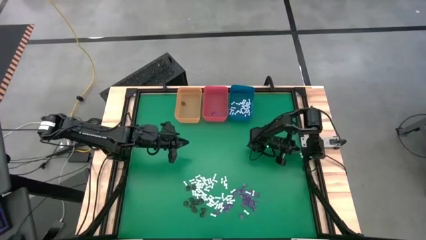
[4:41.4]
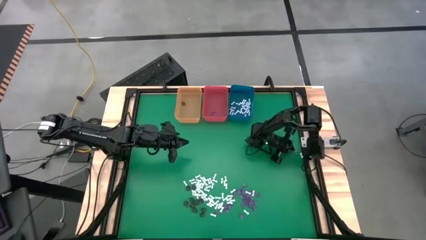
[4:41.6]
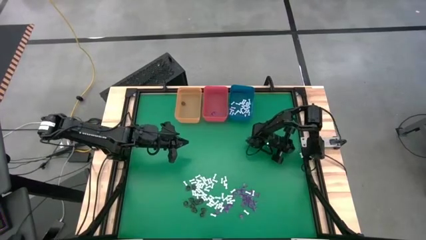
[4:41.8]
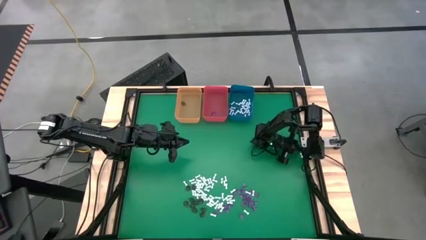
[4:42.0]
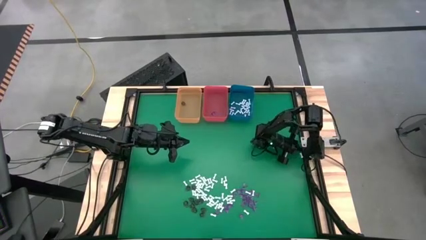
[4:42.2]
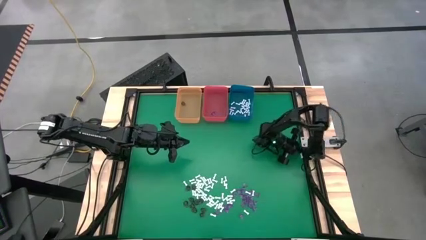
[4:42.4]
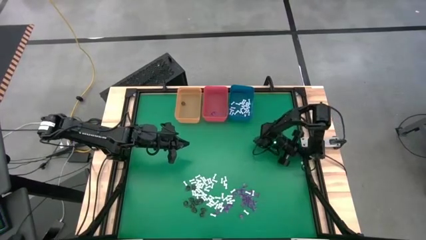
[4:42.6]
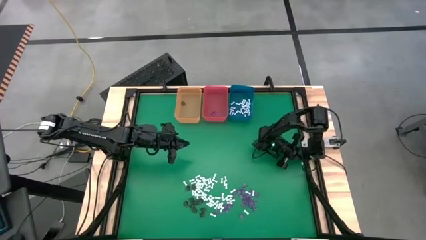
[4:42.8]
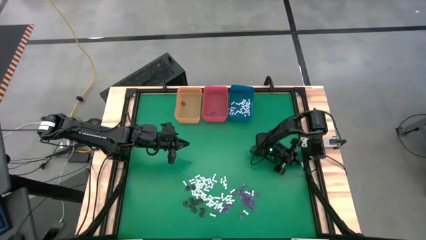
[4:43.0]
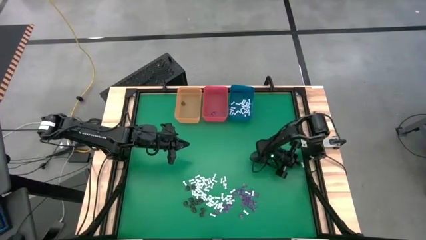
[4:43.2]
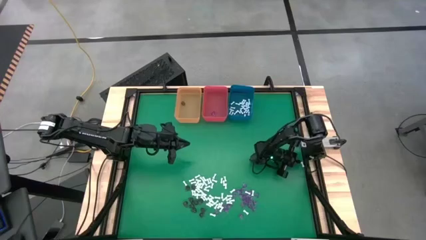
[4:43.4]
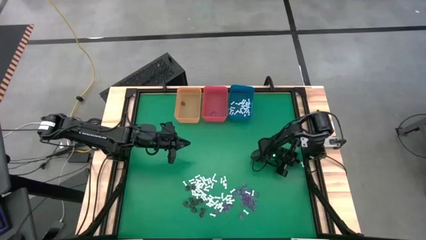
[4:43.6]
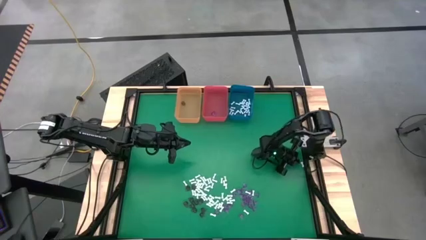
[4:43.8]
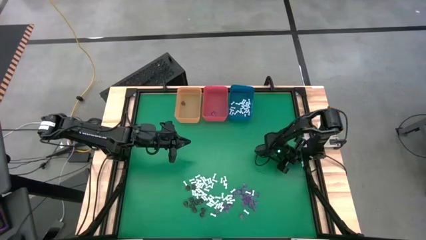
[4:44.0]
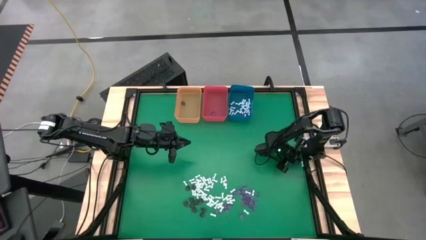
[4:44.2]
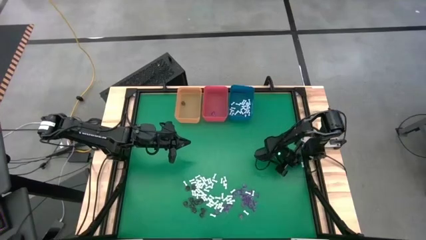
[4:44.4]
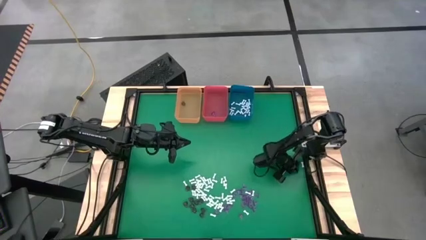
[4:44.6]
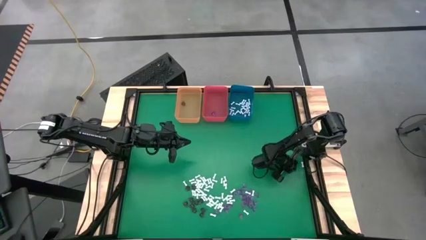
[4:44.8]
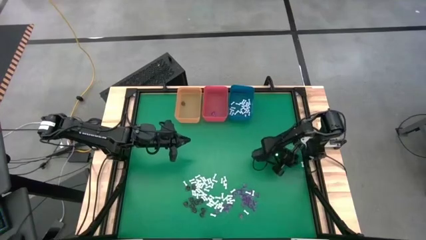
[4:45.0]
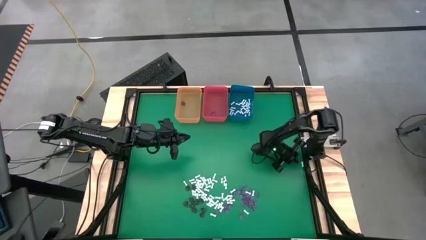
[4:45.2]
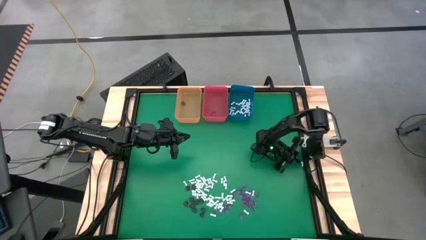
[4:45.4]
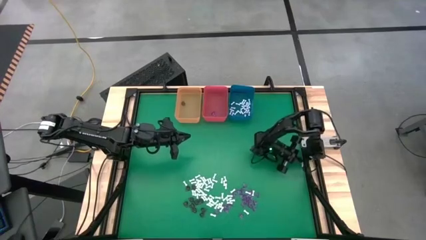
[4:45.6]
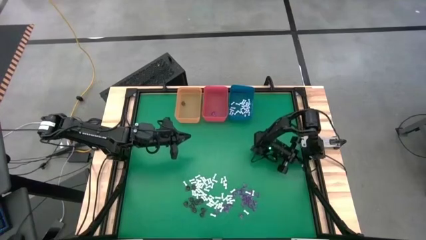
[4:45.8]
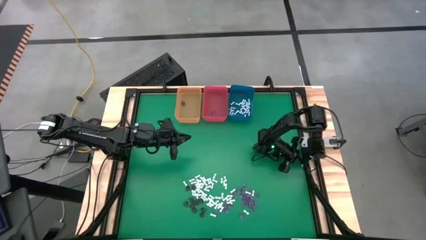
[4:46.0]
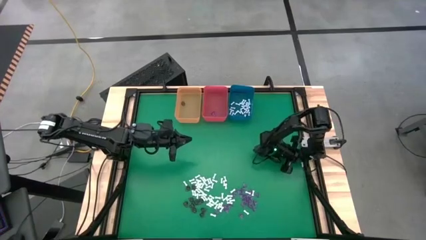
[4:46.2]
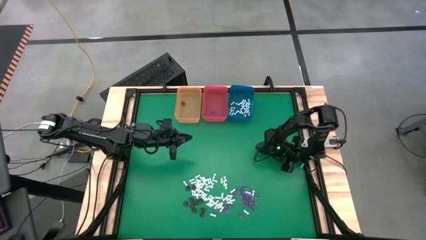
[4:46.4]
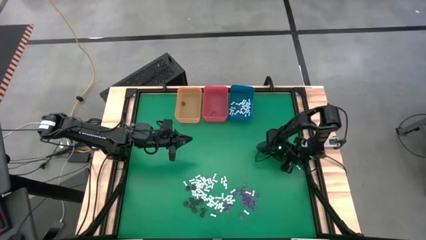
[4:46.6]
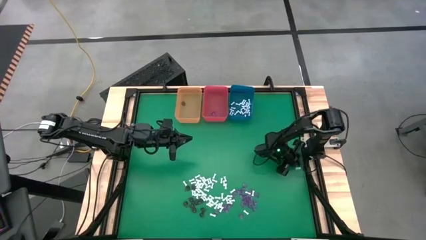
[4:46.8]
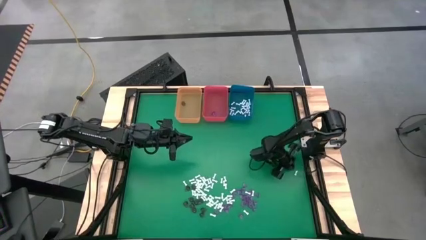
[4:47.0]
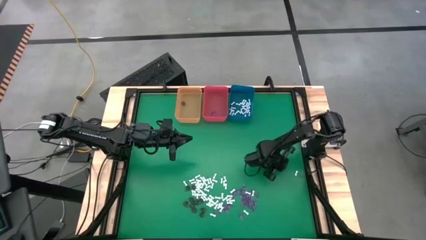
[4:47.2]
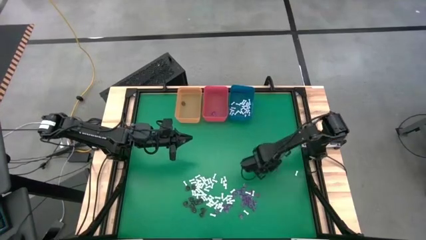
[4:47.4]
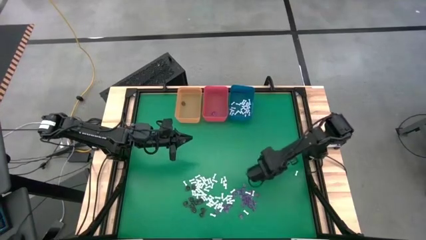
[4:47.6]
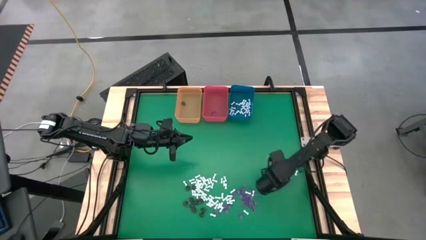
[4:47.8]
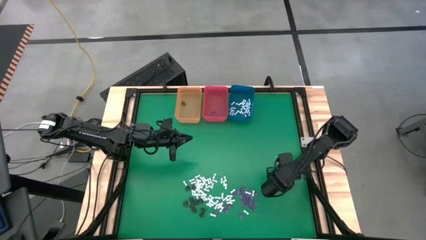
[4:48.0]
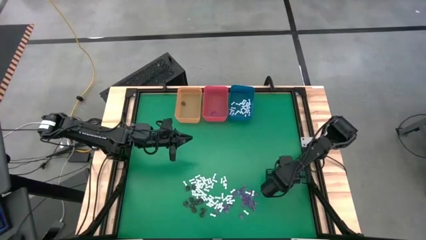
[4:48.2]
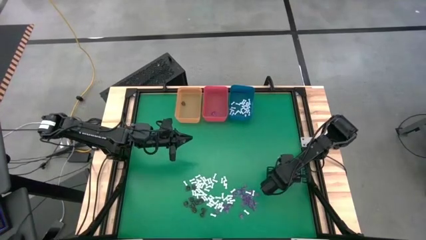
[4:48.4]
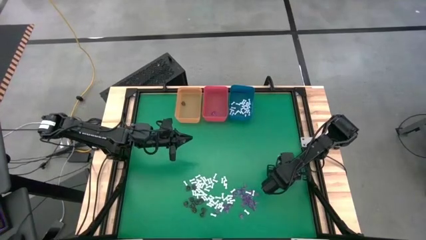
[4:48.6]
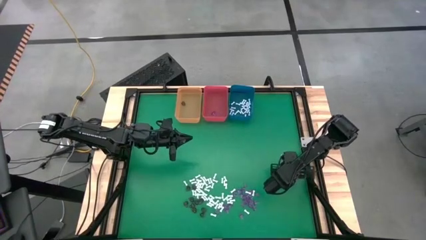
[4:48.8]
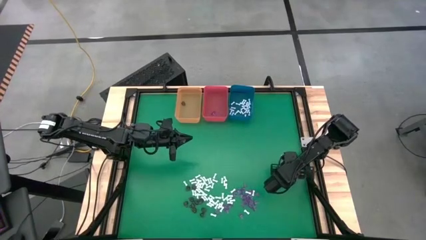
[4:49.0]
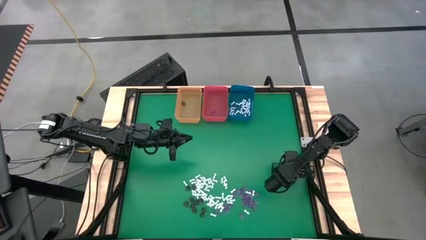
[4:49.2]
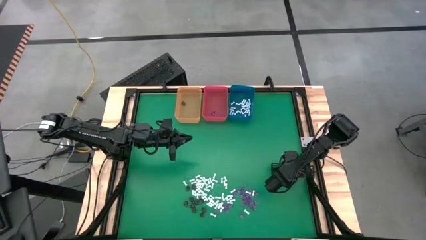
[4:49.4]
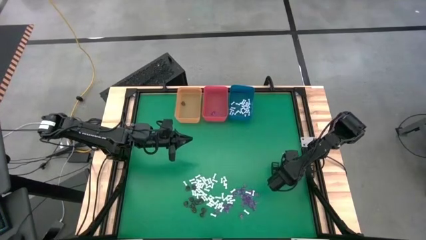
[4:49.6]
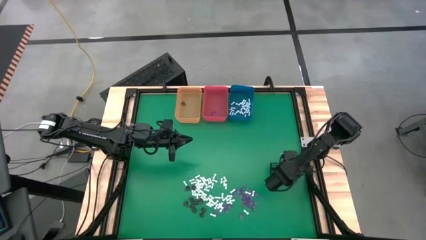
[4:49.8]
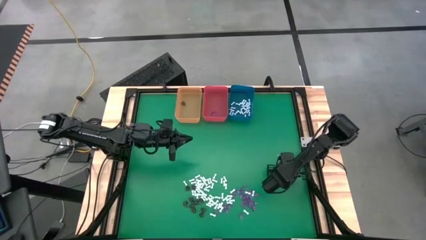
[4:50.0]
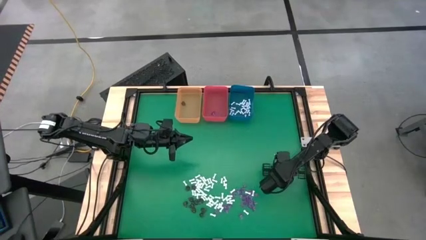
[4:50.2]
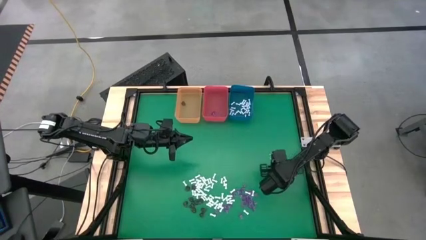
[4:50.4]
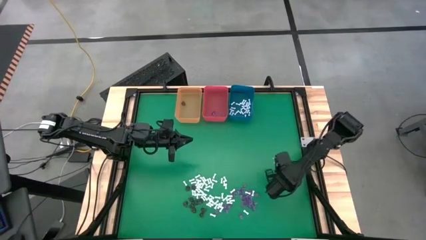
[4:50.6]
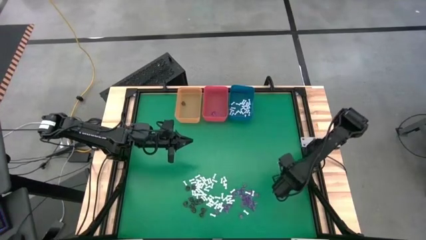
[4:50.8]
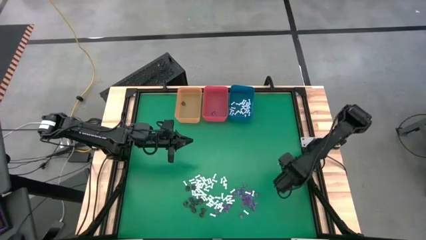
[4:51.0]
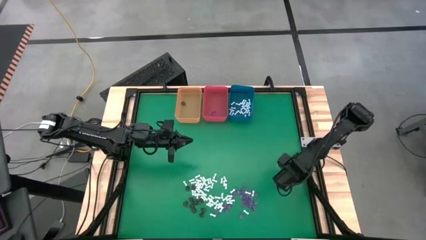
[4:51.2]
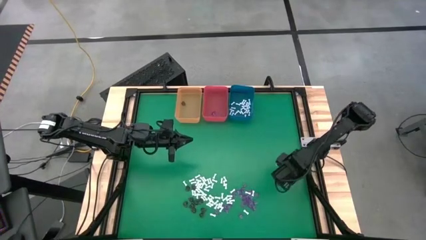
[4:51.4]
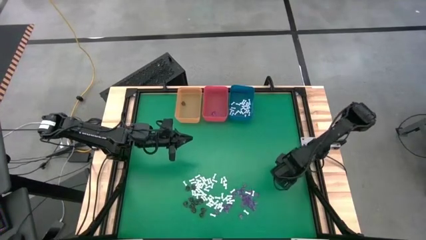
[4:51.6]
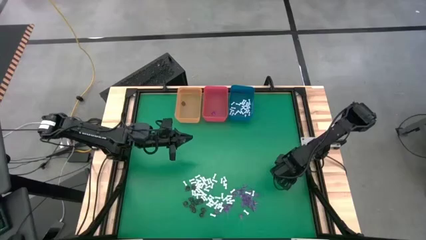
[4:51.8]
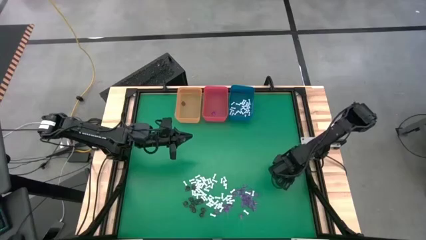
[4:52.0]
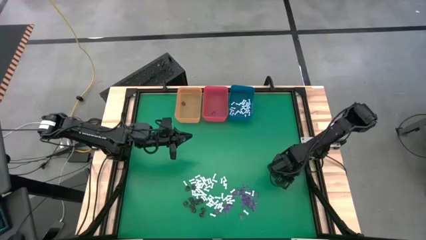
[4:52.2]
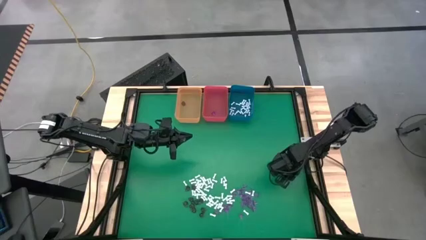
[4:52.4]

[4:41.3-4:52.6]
Task: Sort Halloween decoration
Put the white bone toy into the blue bin

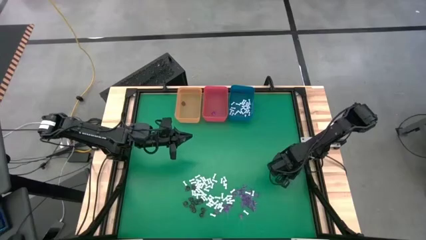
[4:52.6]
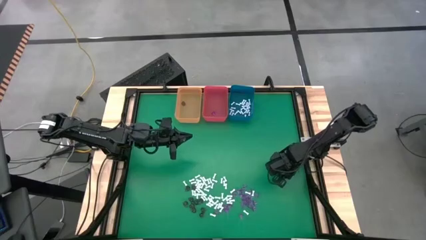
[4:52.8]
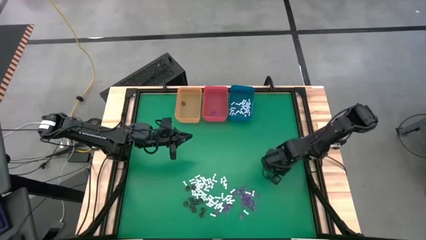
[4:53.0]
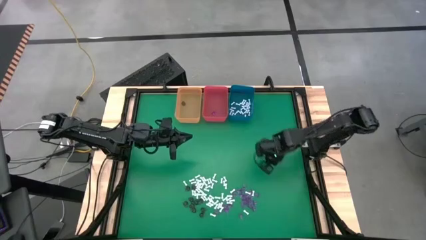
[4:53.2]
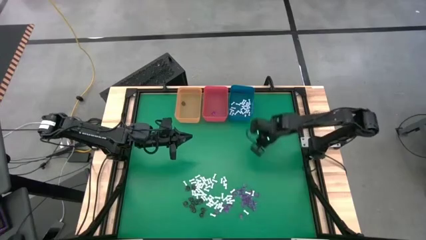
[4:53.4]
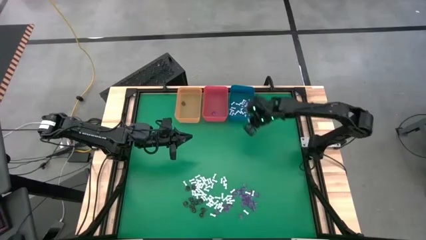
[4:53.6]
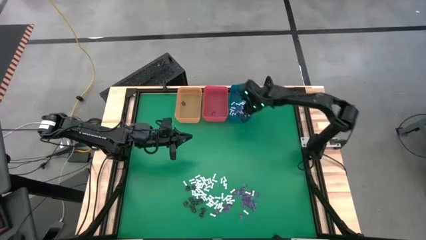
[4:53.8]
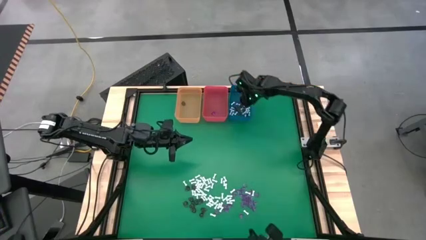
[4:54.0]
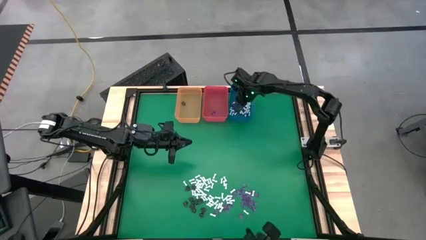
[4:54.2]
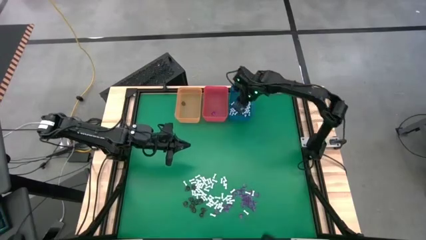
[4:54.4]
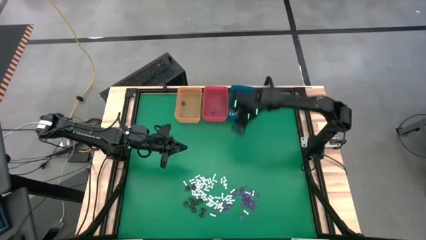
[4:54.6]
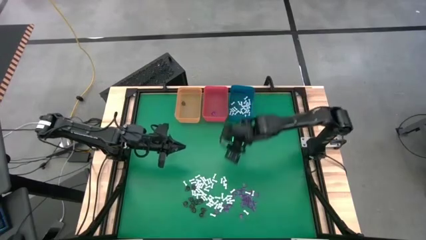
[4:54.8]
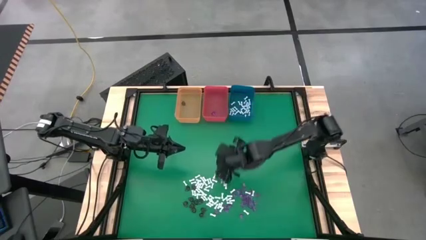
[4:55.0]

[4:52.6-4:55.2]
Put the white bone toy into the blue bin

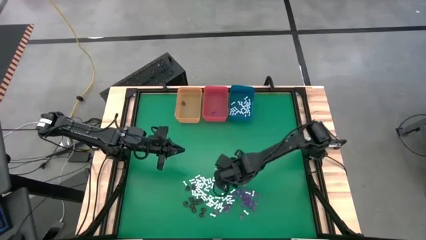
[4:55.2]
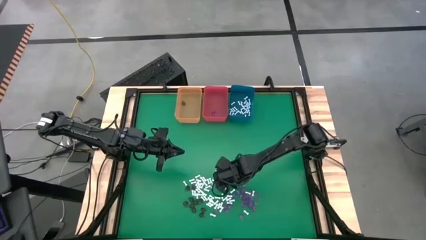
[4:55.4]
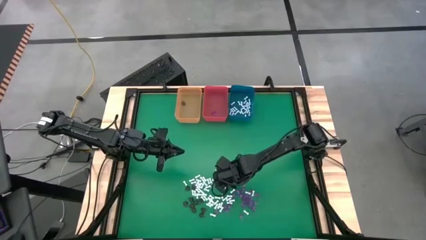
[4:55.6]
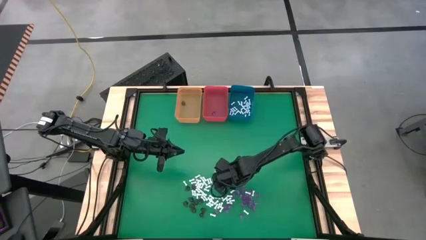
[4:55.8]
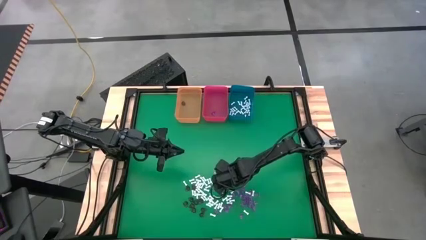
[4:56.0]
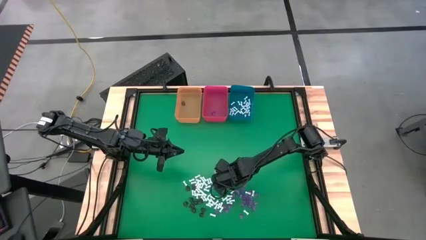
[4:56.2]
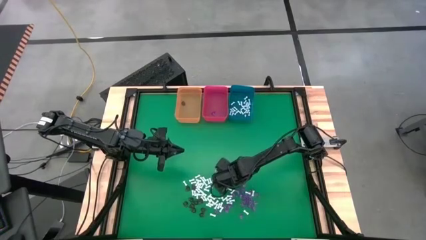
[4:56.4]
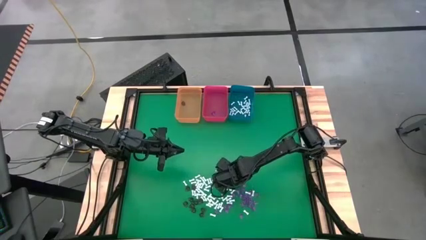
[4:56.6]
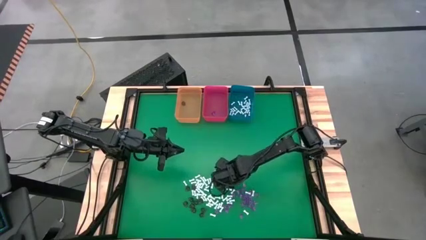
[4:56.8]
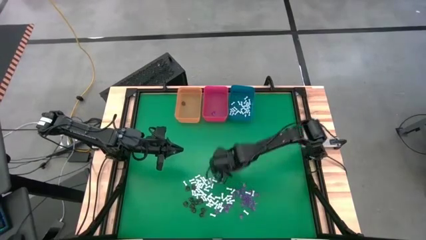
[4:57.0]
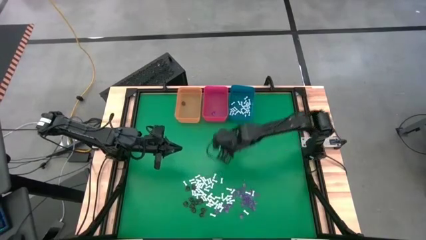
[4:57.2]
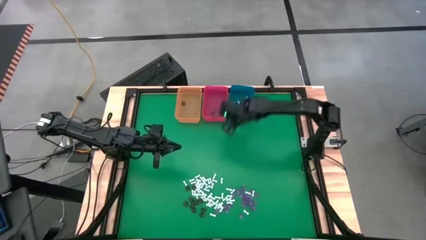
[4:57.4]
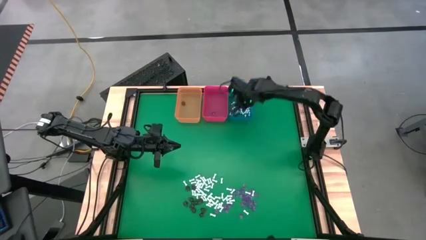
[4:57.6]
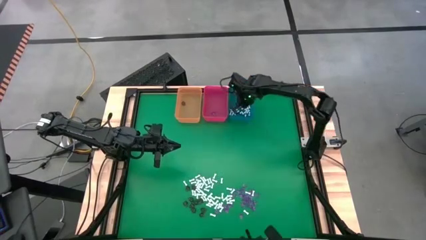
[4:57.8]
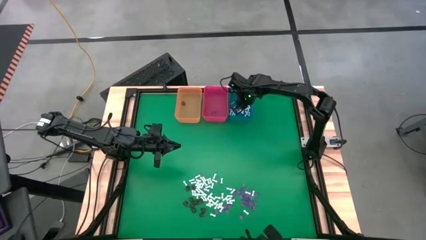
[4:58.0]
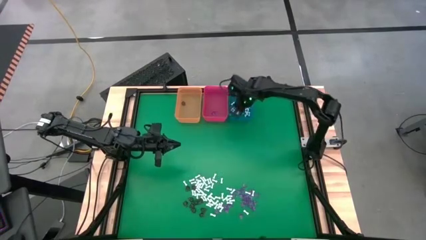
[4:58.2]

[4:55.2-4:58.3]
Put the white bone toy into the blue bin
